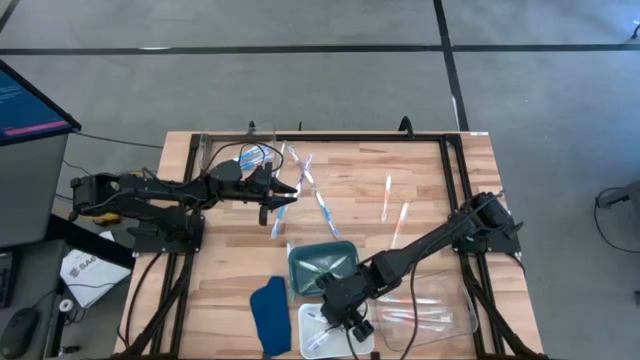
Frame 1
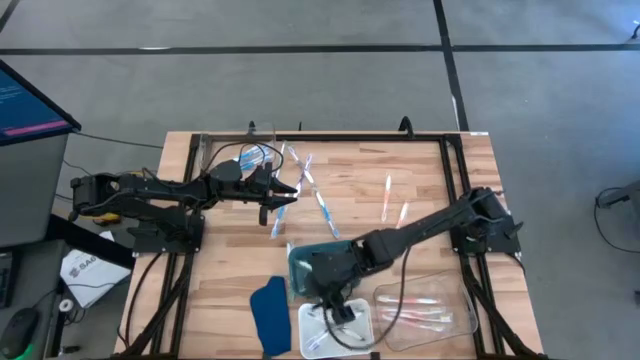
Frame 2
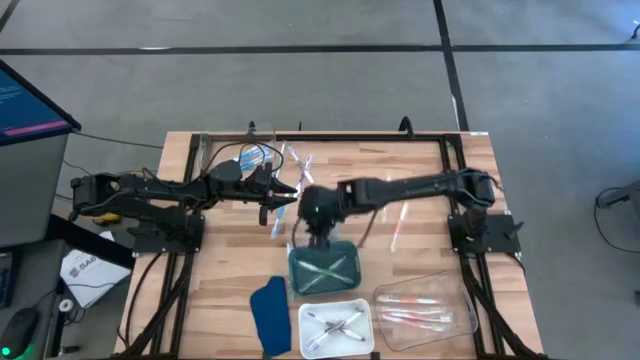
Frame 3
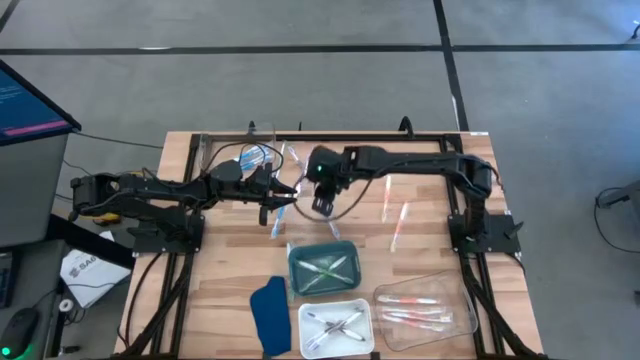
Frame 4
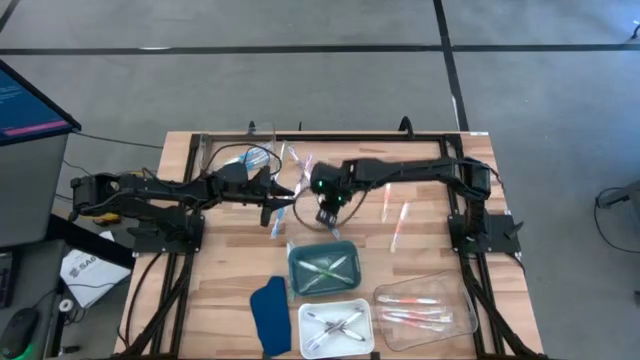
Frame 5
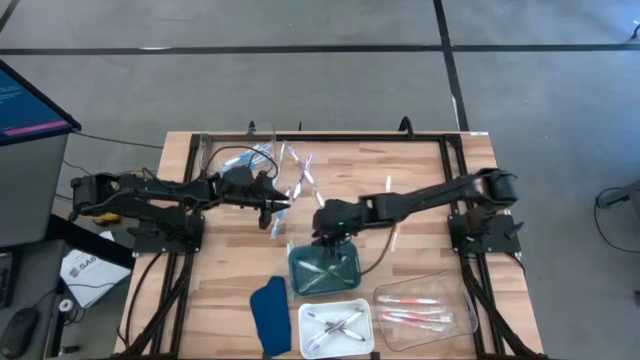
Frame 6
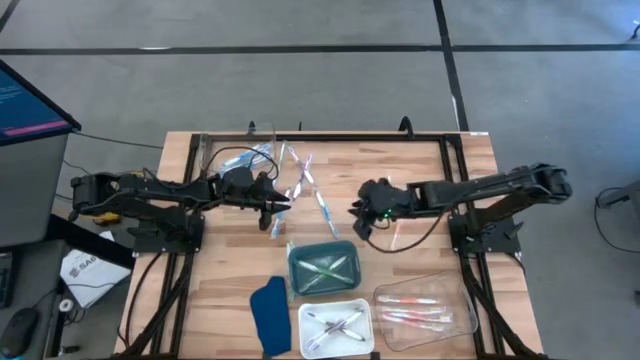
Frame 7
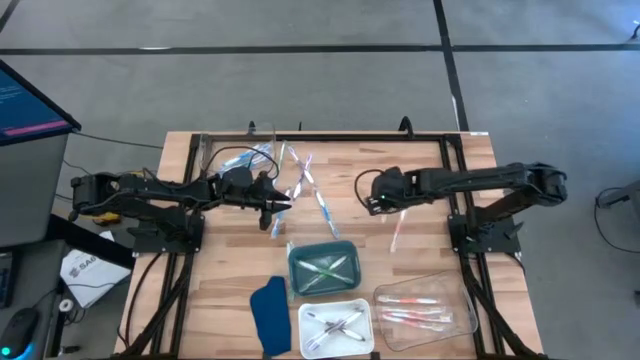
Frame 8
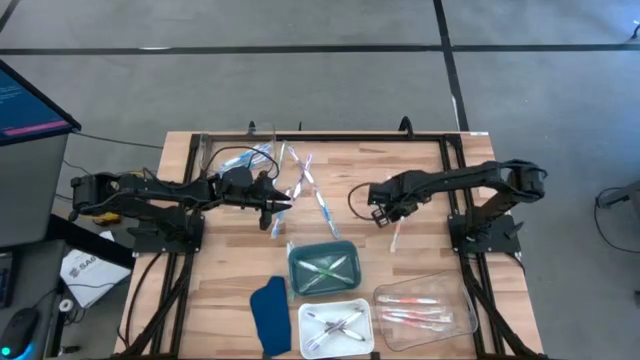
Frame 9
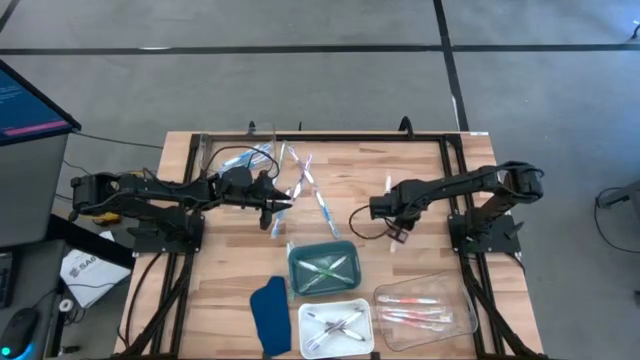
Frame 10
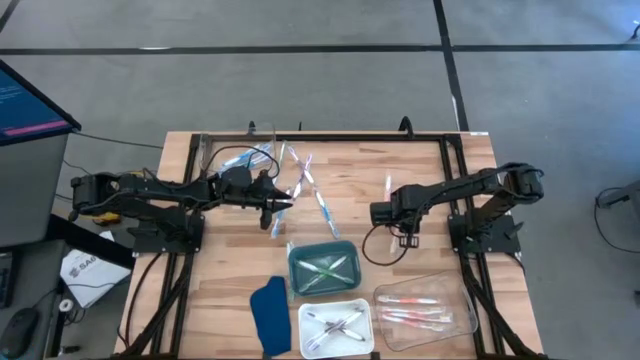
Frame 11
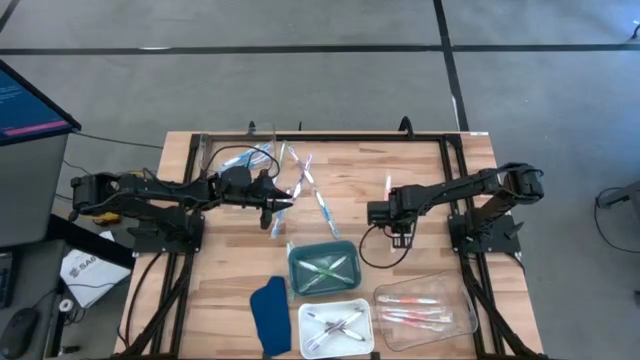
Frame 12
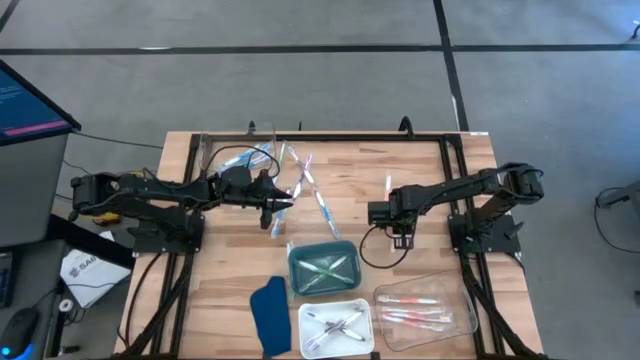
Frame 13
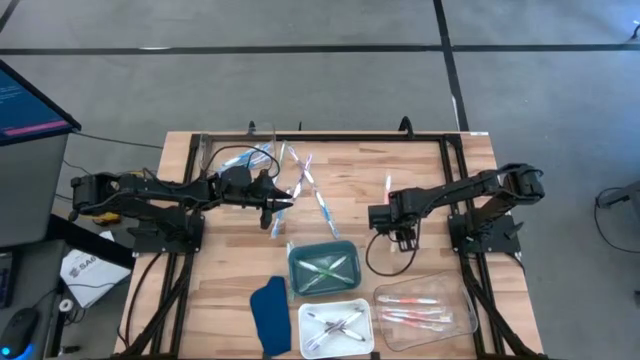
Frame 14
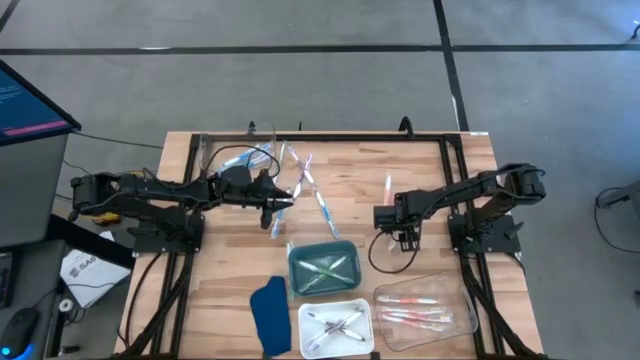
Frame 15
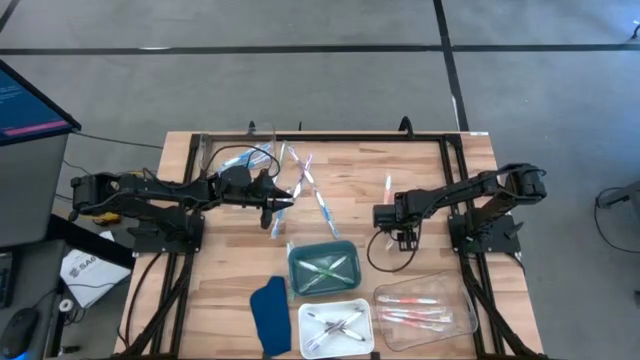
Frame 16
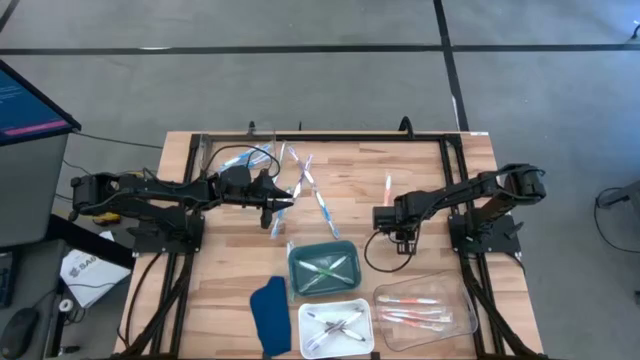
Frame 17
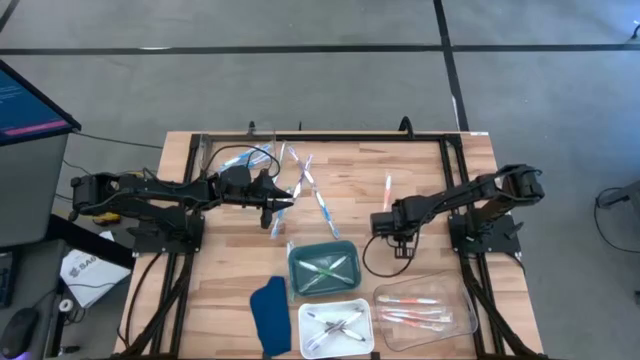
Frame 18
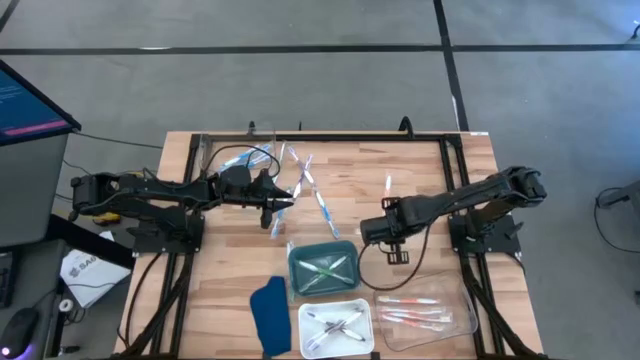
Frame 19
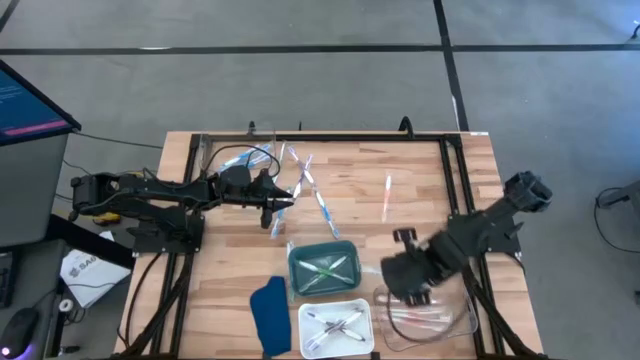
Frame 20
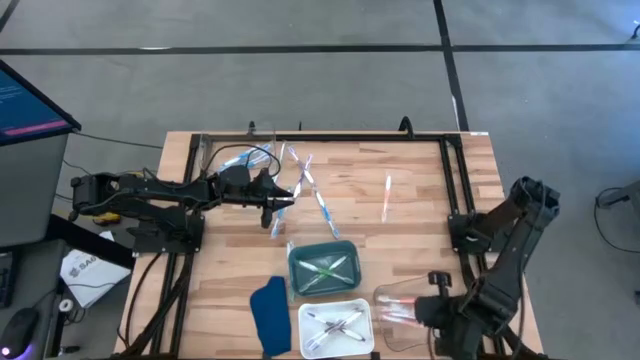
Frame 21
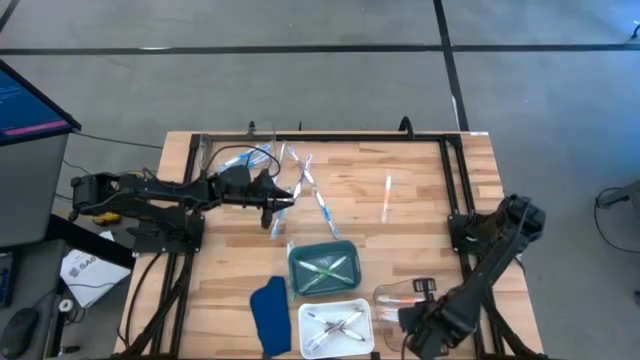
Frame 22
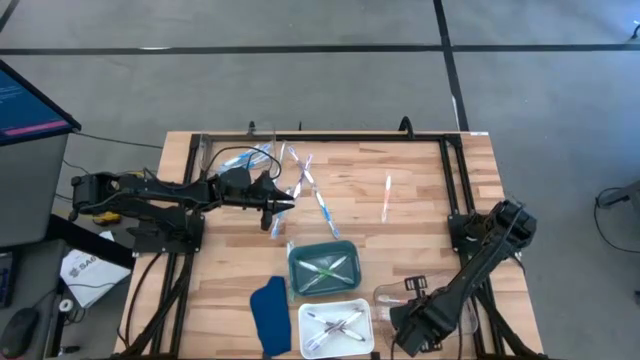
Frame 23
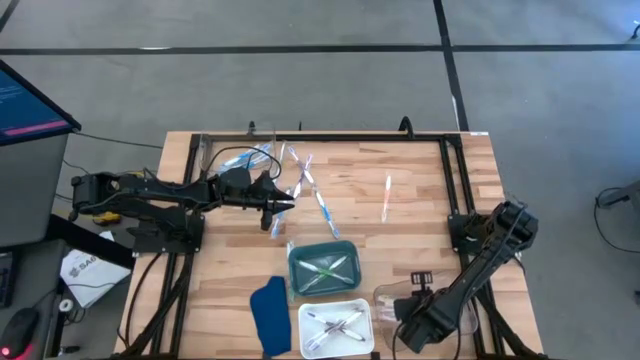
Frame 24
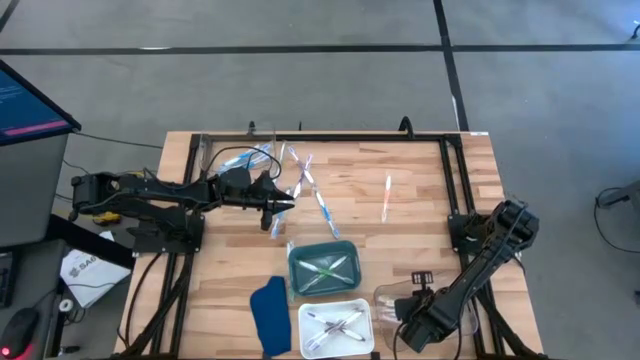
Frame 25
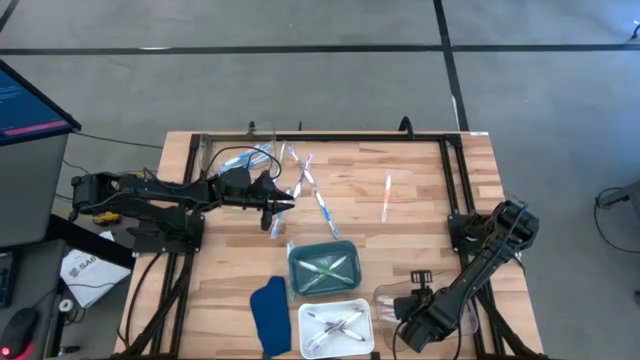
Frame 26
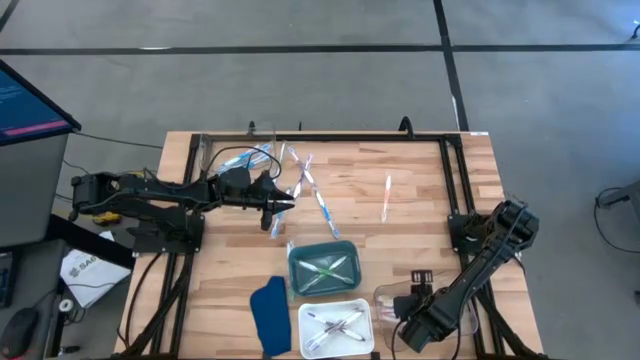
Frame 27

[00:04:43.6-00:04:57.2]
Task: Pick & Place Toothbrushes
Put the orange toothbrush into the bottom transparent bin

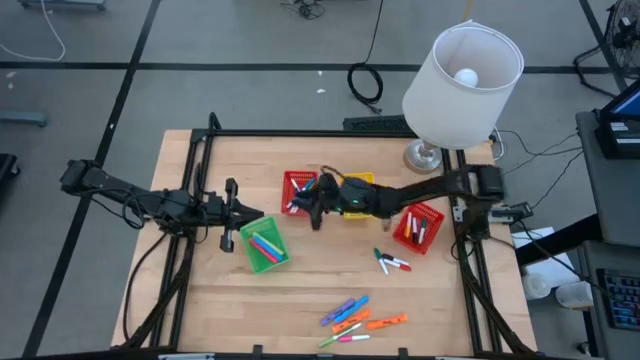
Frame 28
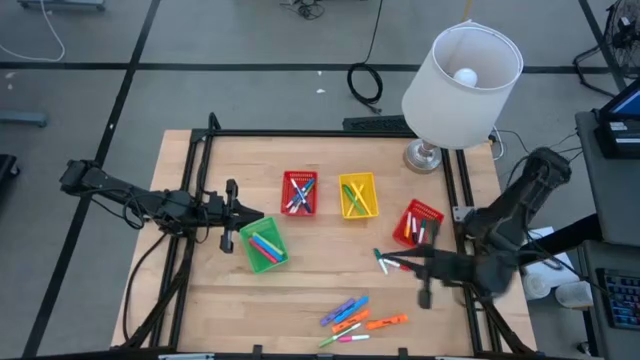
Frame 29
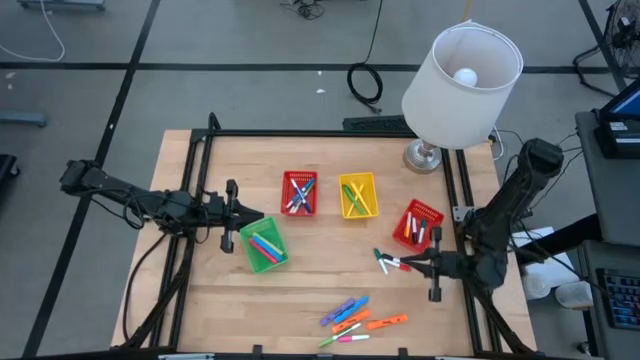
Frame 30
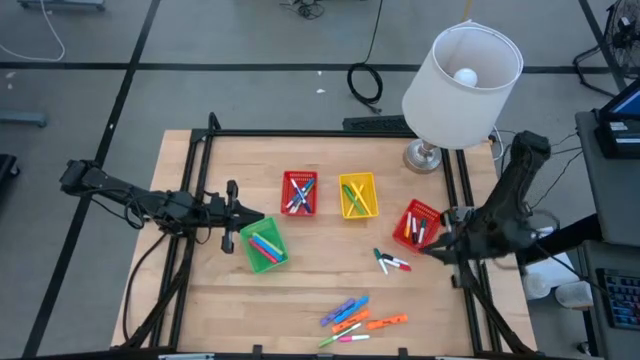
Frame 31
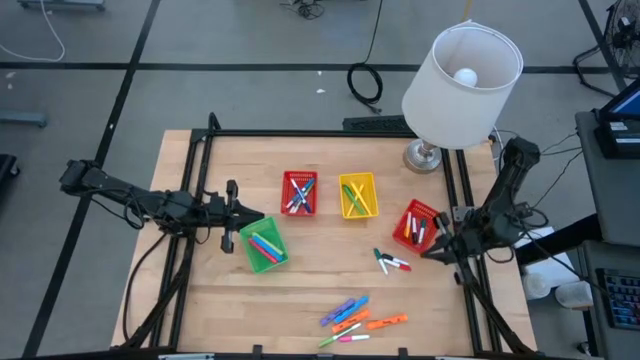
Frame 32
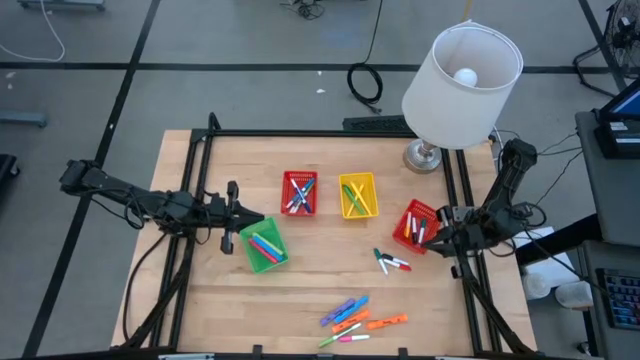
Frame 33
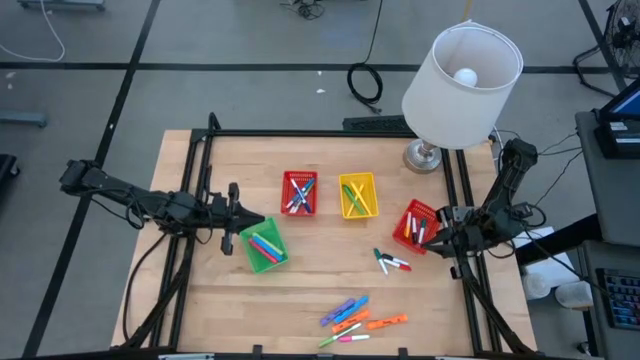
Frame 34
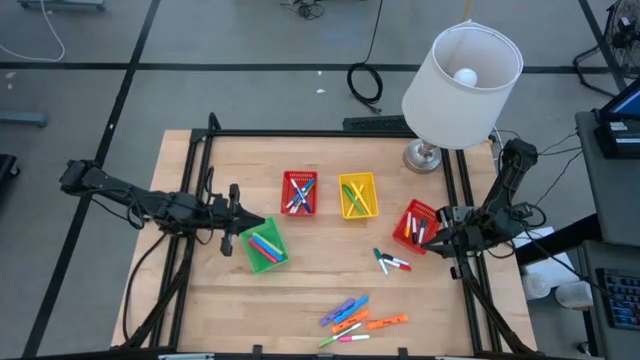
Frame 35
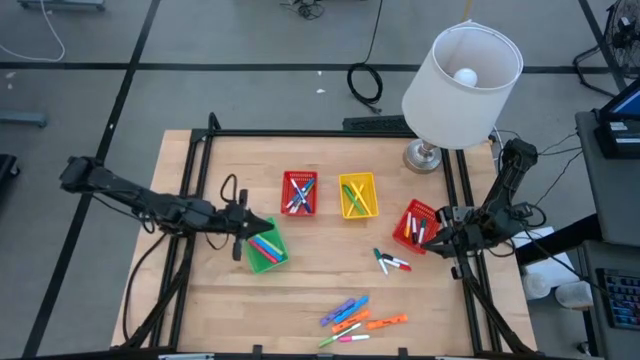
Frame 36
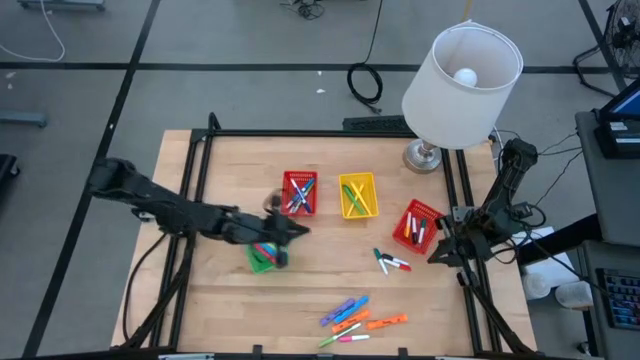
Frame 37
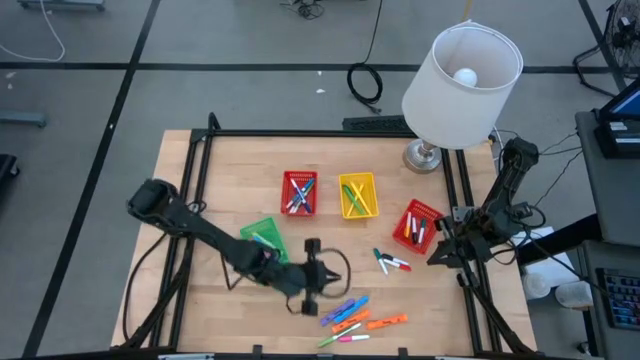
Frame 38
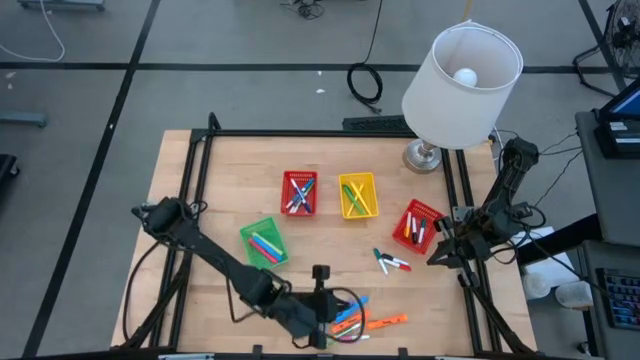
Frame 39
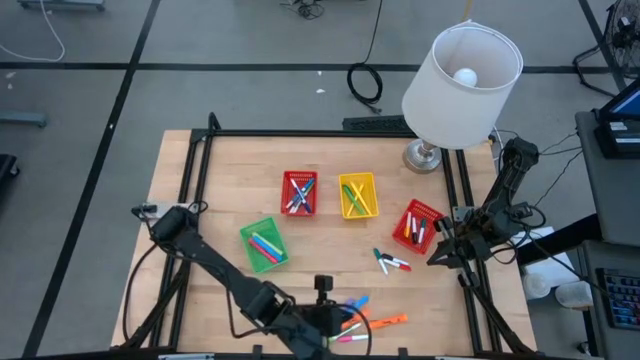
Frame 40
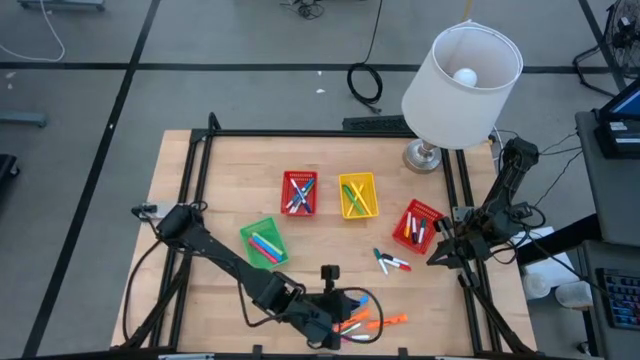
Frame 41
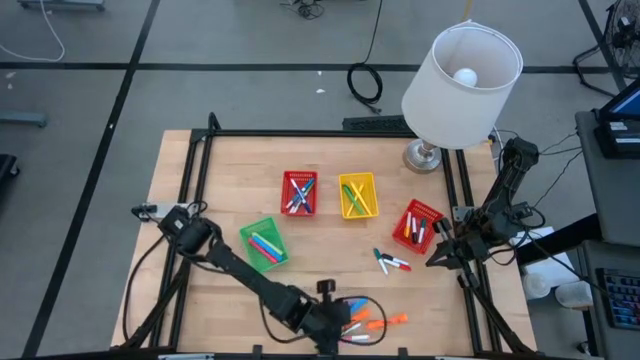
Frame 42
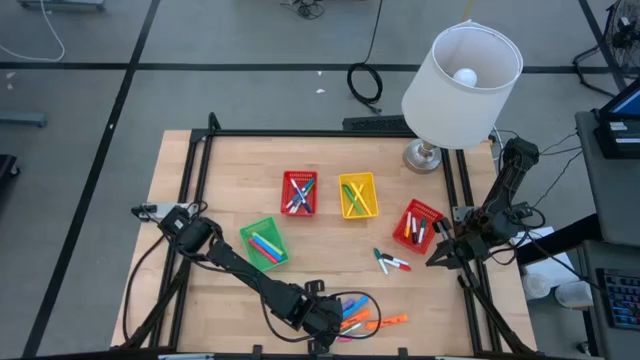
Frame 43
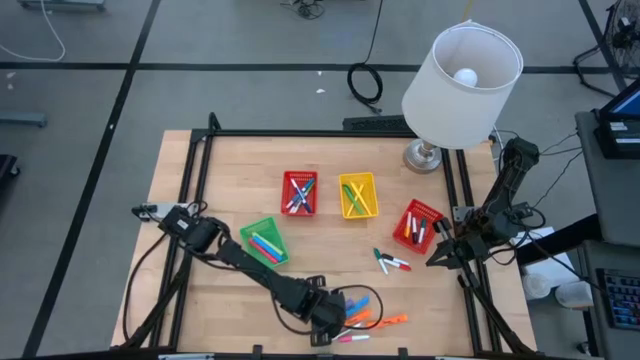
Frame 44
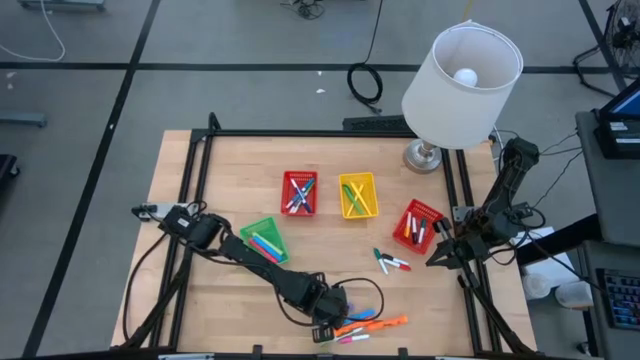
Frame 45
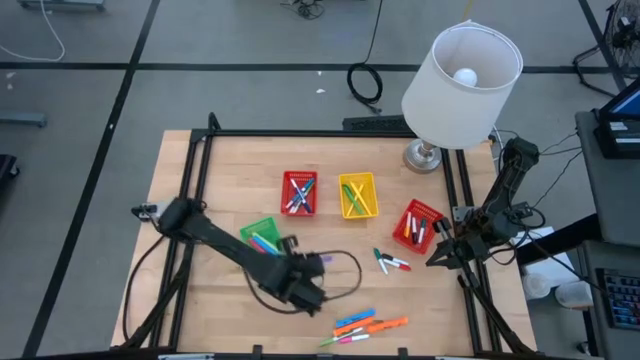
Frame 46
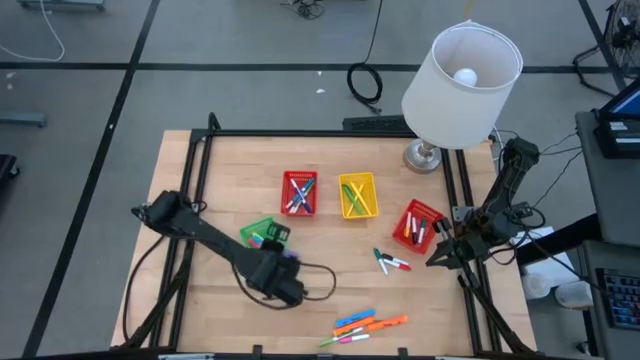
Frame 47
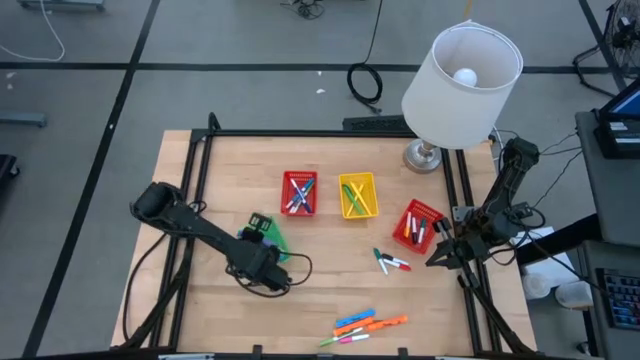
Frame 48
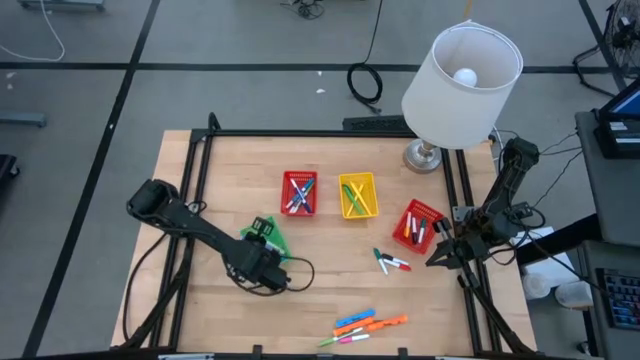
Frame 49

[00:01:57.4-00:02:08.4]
Task: Pick & Place Markers
Put the purple highlighter into the green bin
